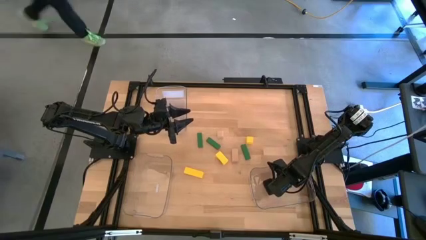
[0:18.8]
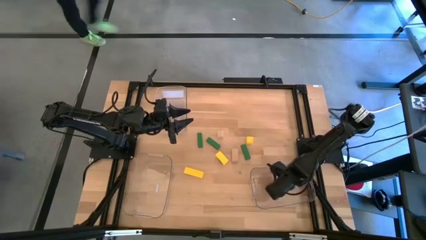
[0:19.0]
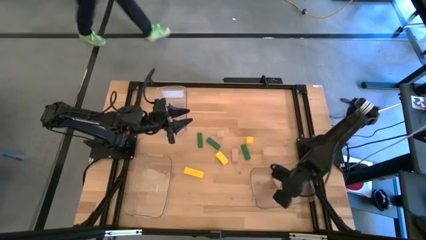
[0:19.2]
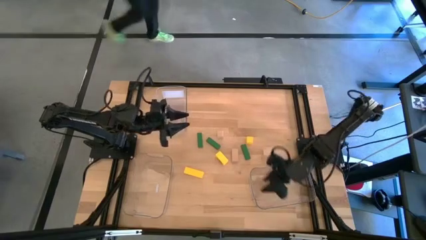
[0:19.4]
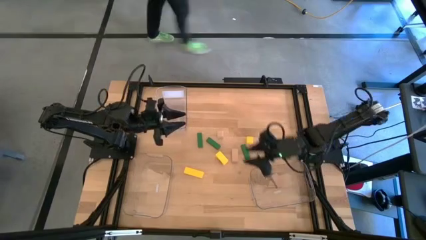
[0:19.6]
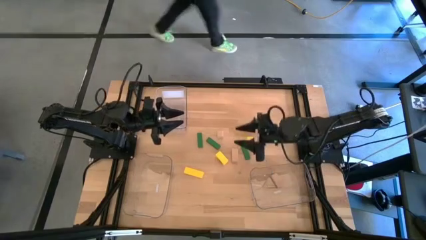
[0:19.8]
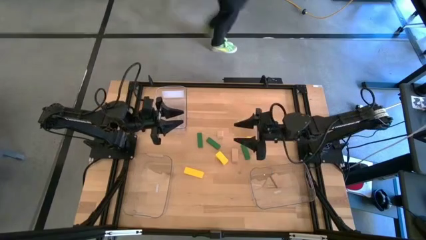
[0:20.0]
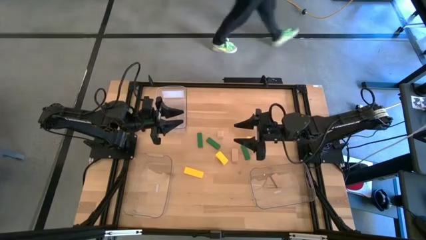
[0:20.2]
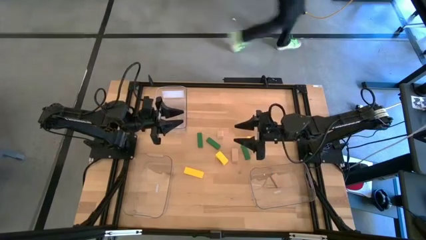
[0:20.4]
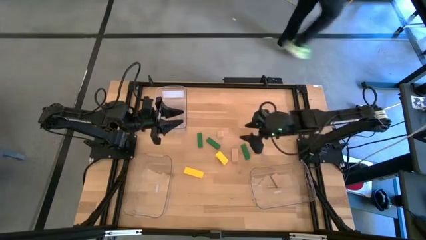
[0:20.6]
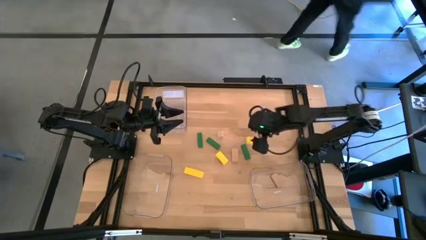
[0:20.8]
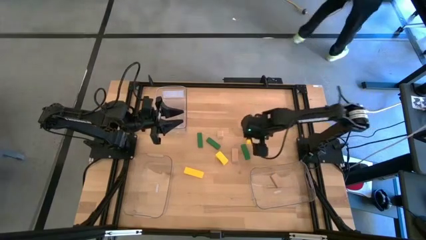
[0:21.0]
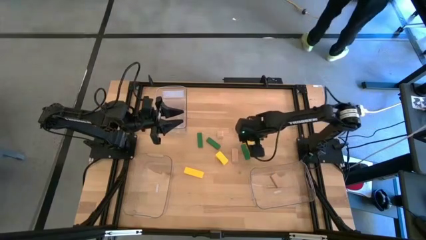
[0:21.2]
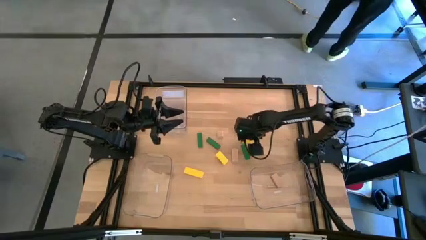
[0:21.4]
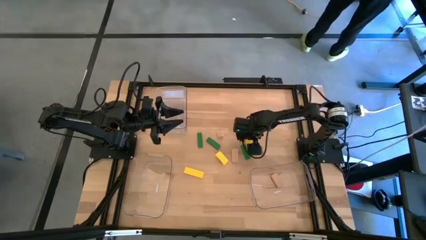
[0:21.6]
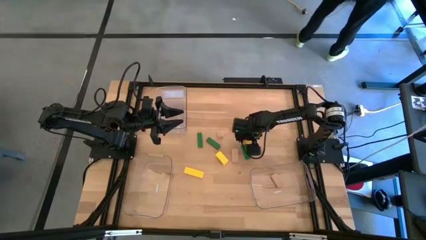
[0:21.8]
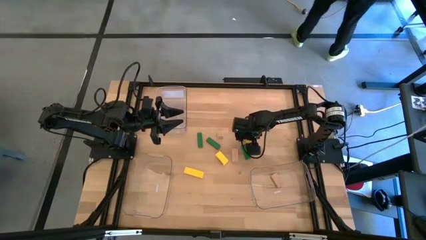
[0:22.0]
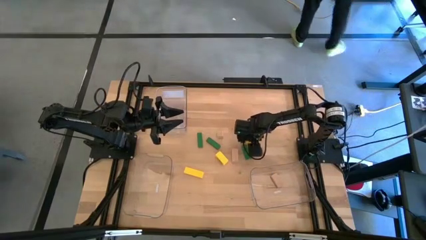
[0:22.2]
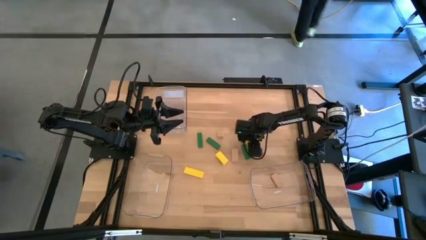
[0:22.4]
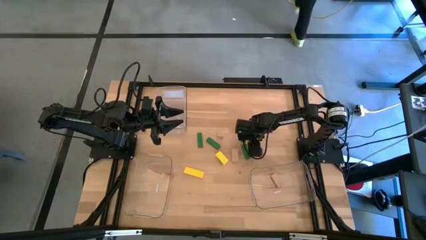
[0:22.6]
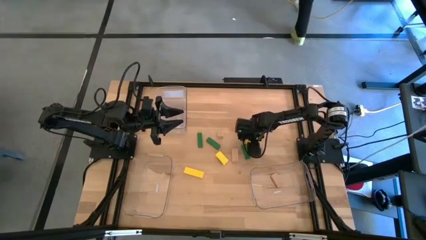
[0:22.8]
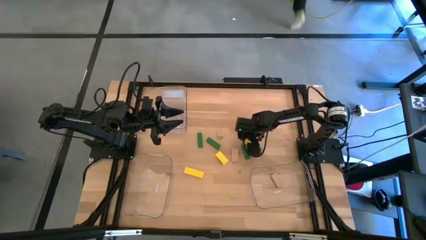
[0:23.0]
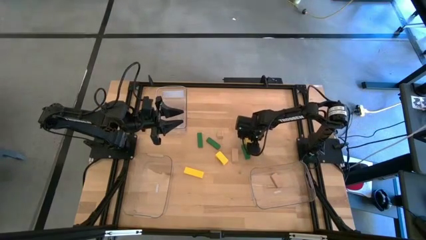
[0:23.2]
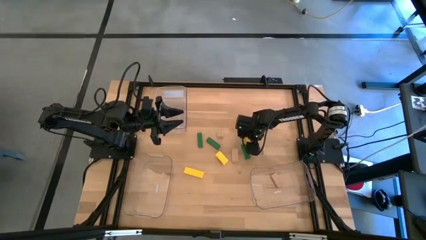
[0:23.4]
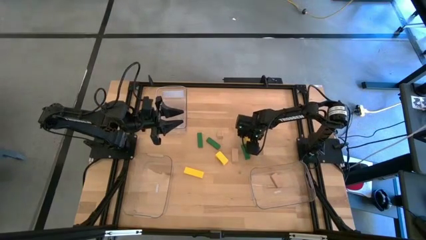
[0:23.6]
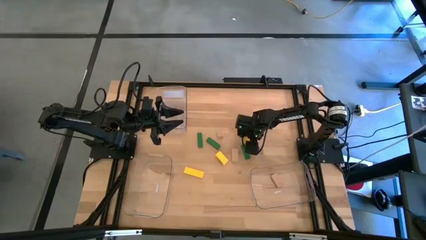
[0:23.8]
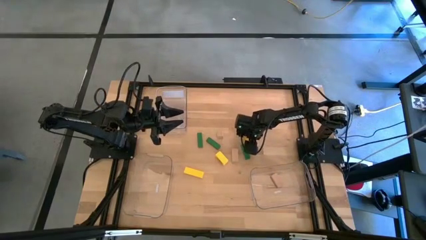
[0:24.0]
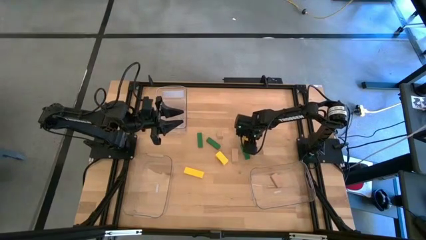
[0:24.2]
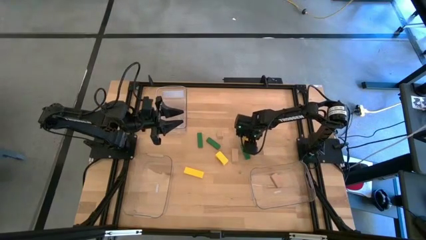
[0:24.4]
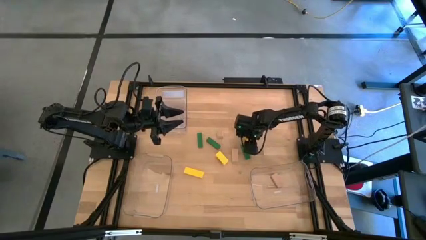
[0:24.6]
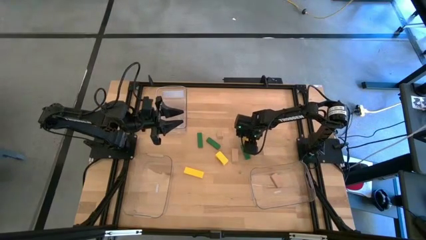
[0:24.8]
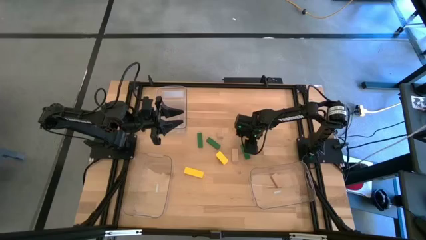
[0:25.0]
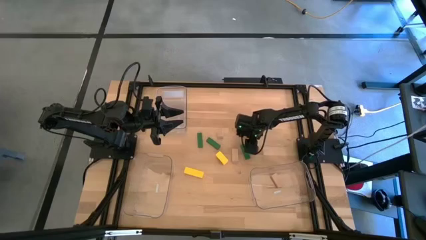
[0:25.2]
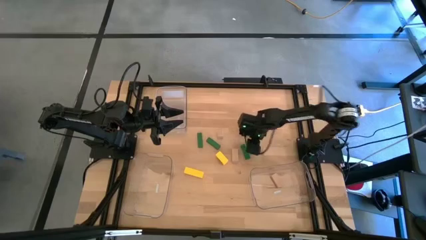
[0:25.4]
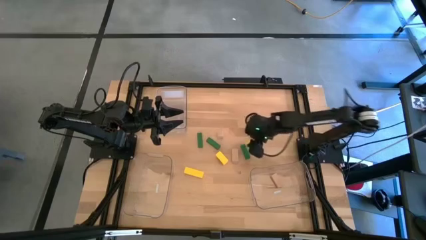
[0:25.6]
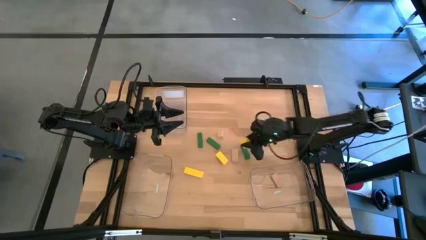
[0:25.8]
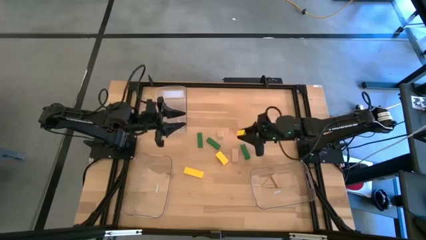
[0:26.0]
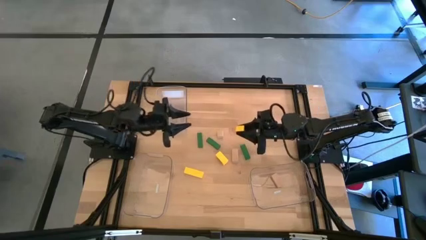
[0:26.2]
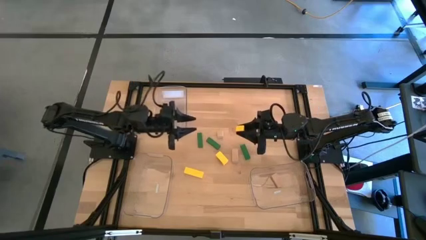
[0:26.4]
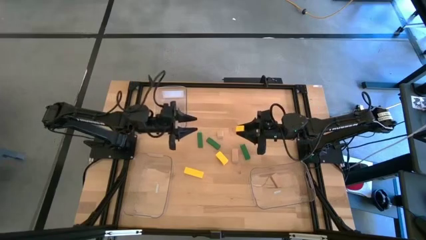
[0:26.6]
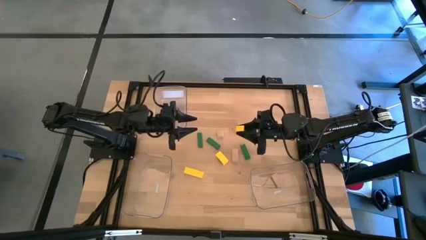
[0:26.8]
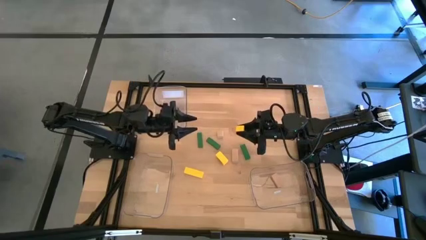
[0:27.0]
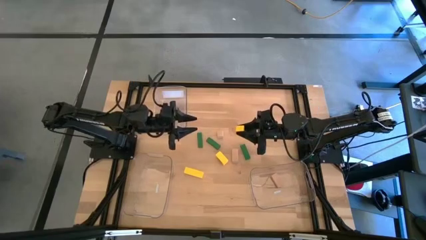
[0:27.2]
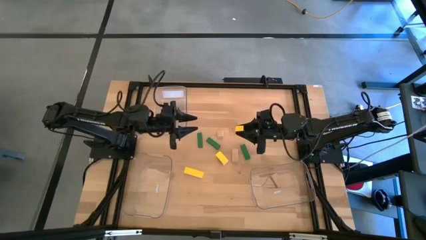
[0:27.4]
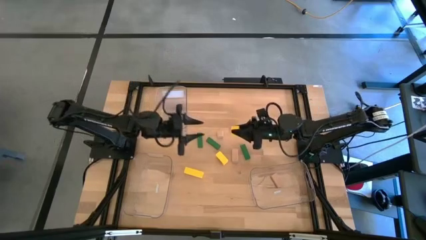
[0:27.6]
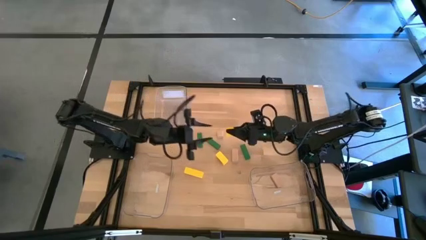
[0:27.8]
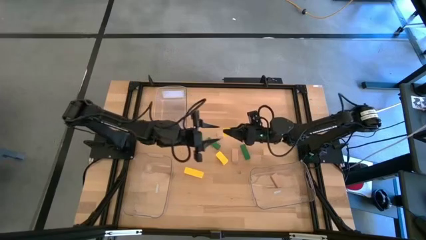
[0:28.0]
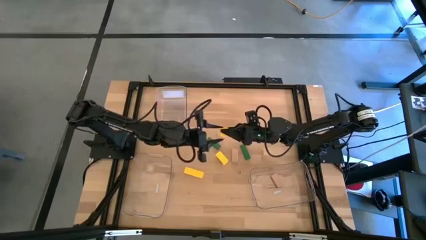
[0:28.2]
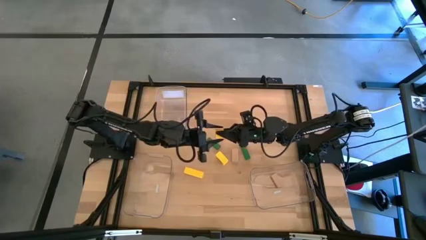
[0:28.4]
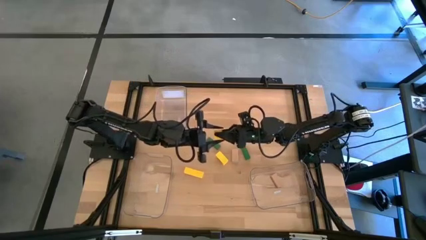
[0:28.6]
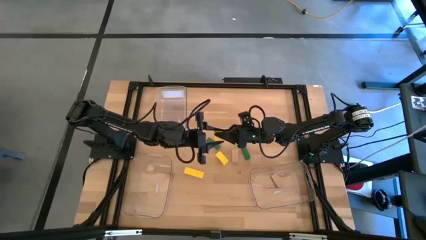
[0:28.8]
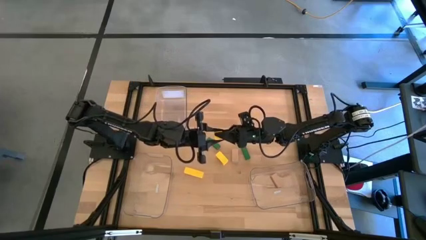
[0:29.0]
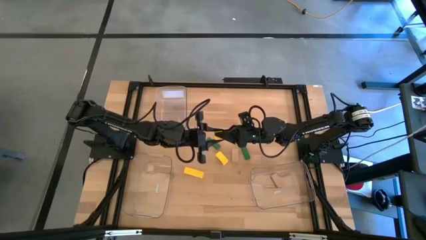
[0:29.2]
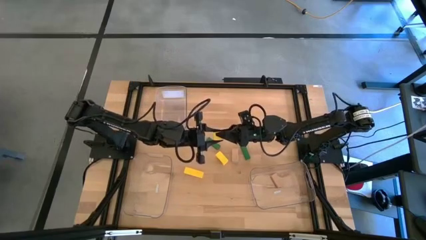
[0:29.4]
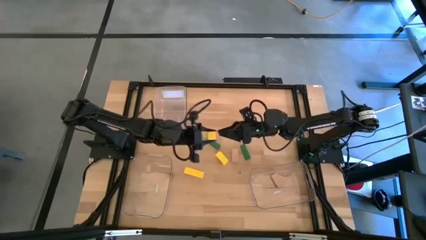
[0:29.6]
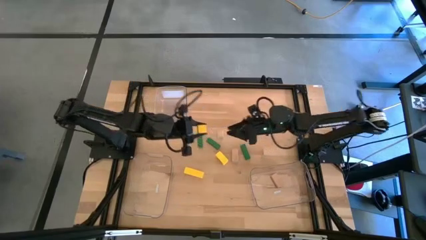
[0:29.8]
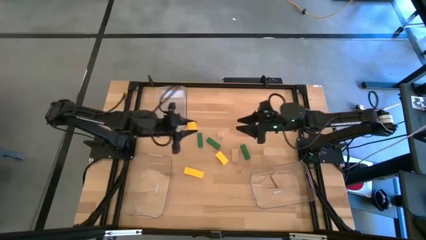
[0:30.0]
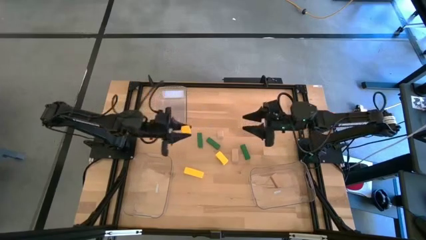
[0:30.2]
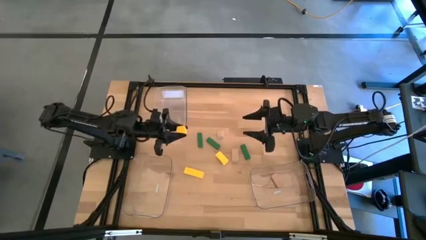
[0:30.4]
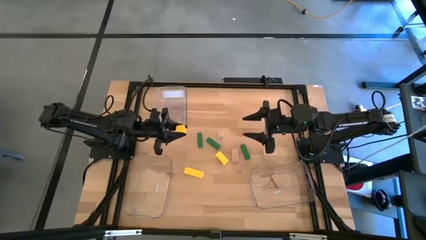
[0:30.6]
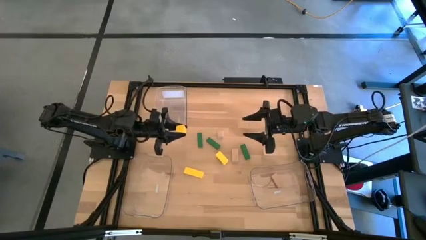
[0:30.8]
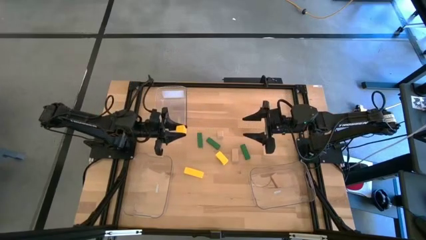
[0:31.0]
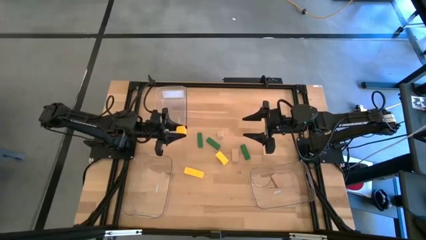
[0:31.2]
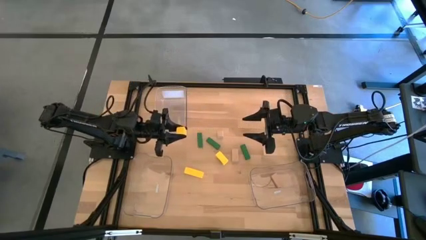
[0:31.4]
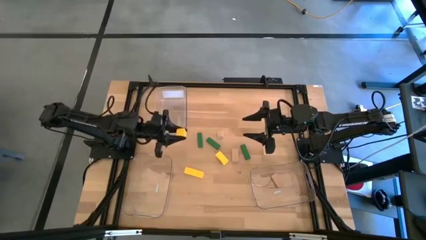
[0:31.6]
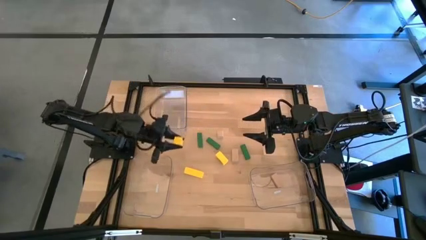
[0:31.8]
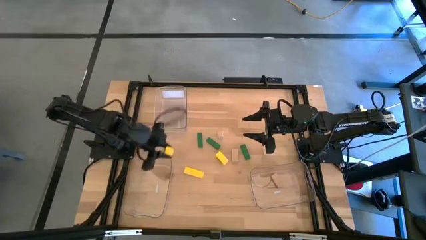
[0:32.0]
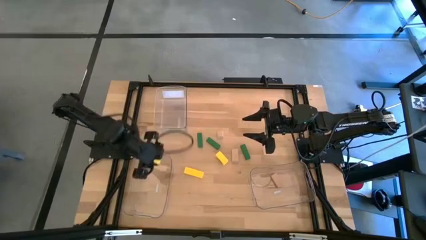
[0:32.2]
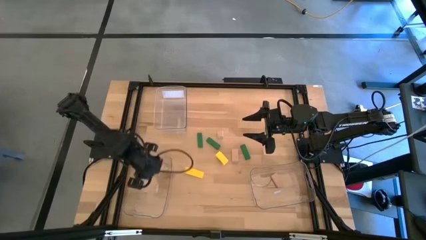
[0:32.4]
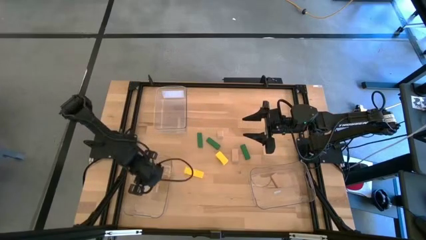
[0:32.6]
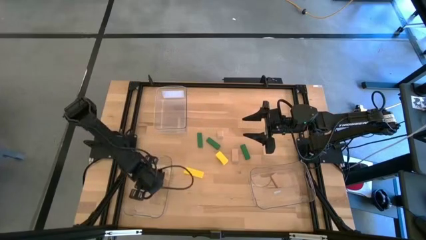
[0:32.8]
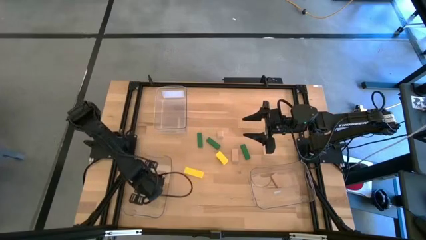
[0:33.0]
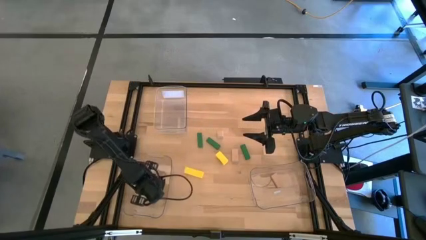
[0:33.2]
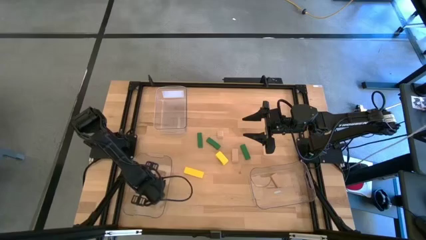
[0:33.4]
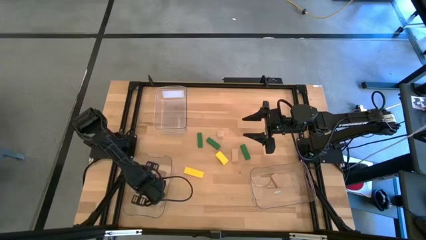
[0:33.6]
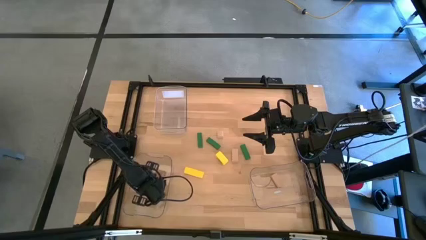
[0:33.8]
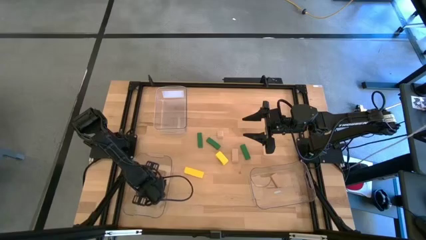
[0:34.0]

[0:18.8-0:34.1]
Task: Sort & place blocks by color
Put the top right yellow block into the bottom left transparent bin
